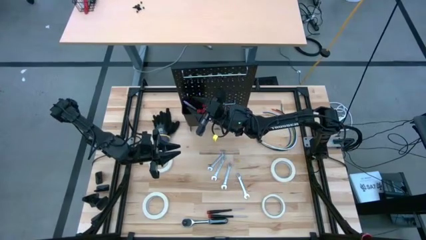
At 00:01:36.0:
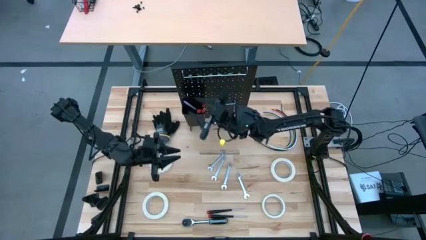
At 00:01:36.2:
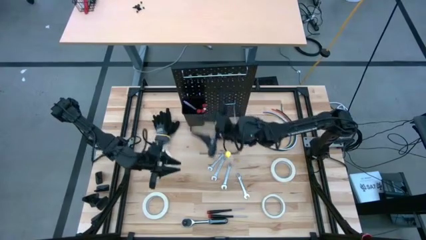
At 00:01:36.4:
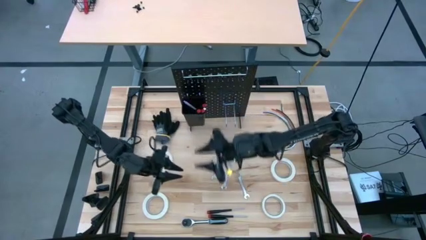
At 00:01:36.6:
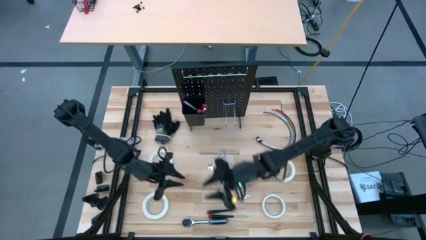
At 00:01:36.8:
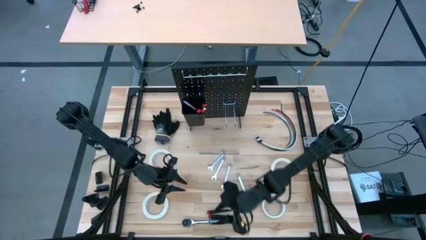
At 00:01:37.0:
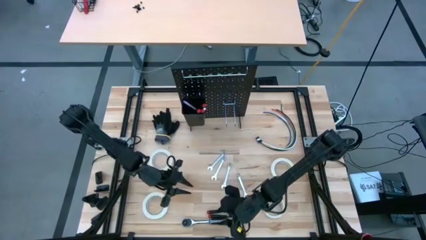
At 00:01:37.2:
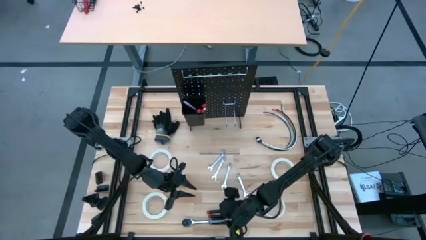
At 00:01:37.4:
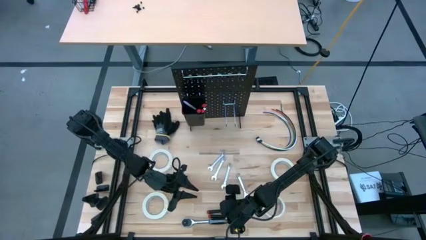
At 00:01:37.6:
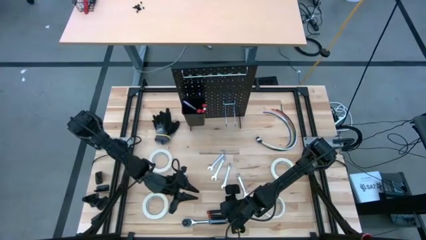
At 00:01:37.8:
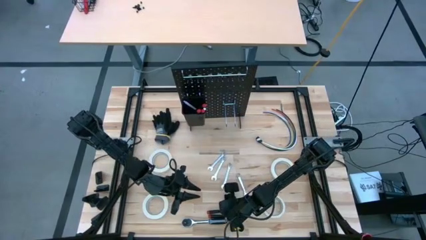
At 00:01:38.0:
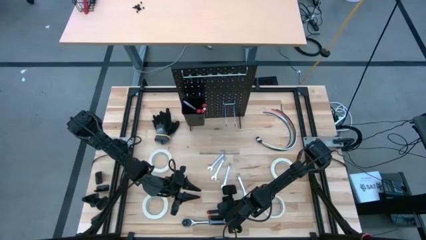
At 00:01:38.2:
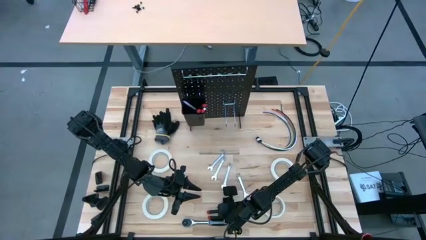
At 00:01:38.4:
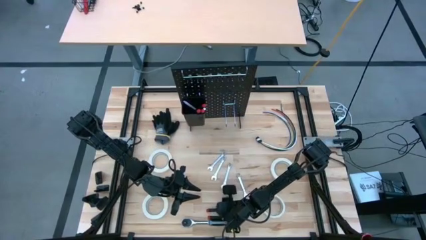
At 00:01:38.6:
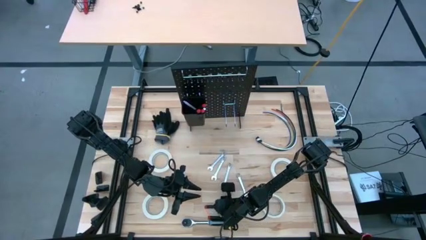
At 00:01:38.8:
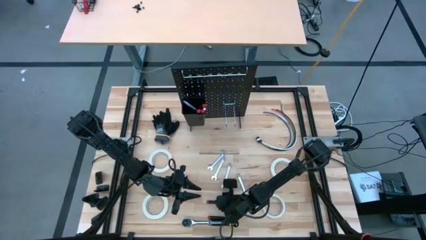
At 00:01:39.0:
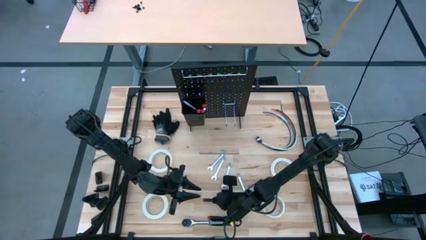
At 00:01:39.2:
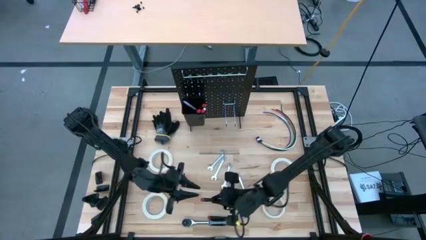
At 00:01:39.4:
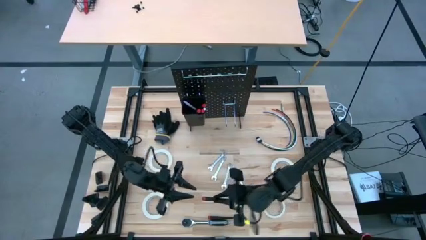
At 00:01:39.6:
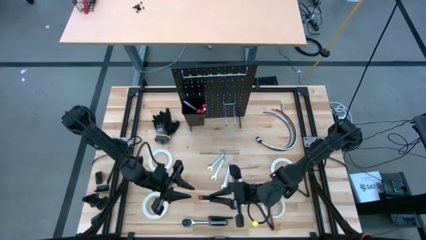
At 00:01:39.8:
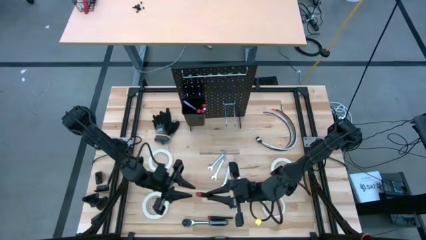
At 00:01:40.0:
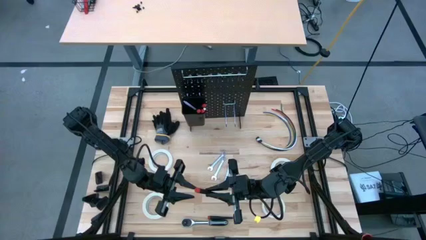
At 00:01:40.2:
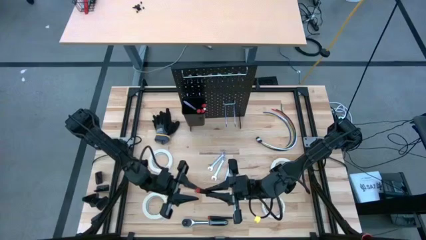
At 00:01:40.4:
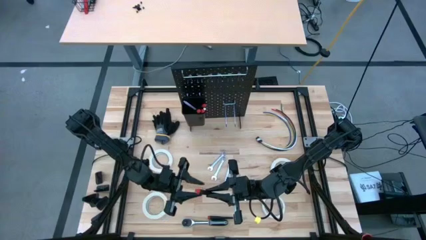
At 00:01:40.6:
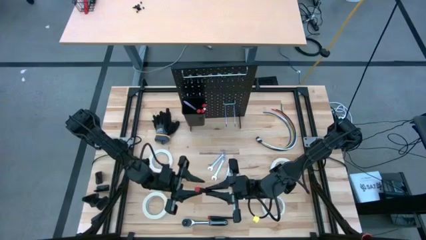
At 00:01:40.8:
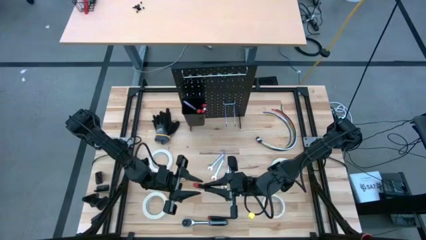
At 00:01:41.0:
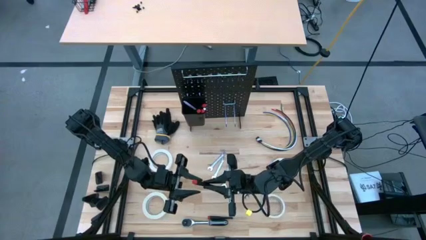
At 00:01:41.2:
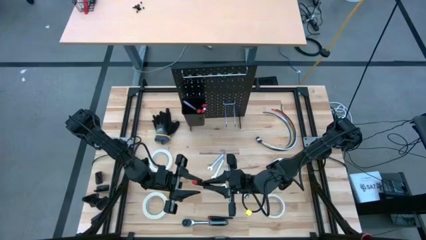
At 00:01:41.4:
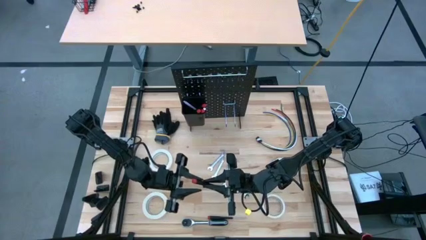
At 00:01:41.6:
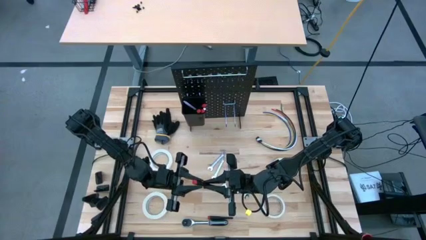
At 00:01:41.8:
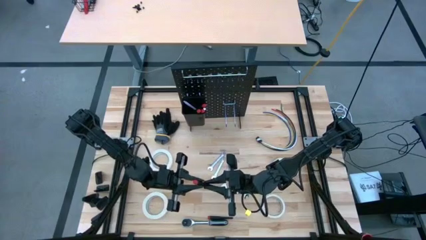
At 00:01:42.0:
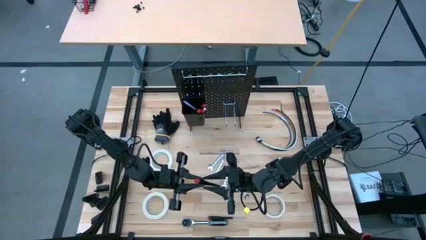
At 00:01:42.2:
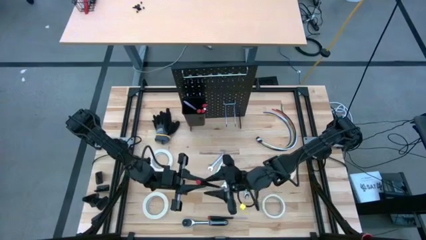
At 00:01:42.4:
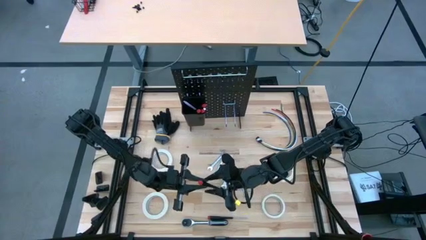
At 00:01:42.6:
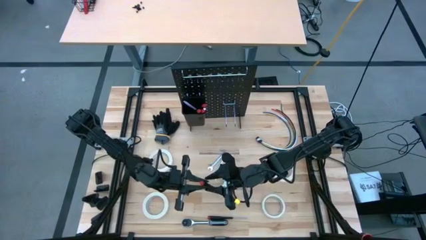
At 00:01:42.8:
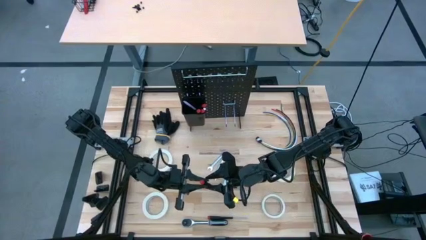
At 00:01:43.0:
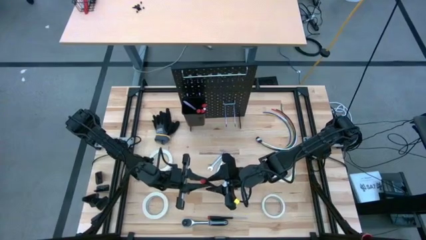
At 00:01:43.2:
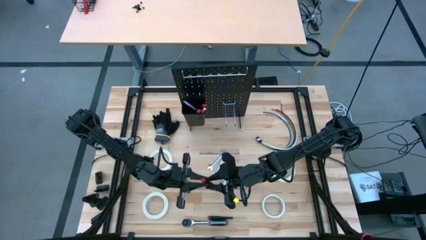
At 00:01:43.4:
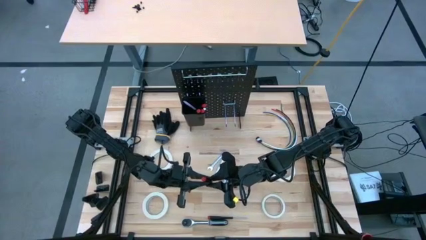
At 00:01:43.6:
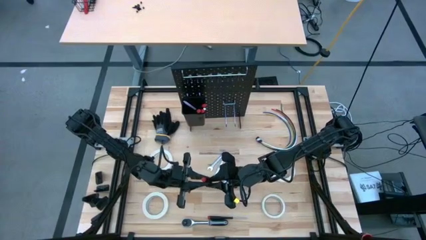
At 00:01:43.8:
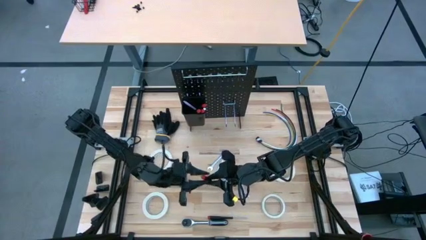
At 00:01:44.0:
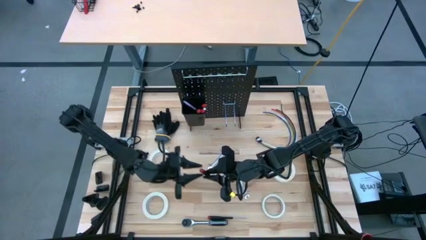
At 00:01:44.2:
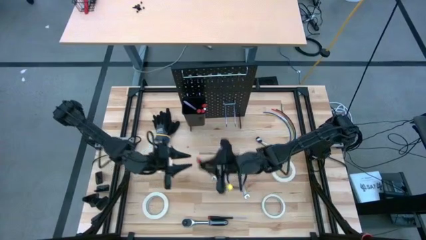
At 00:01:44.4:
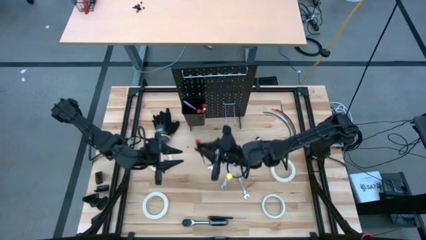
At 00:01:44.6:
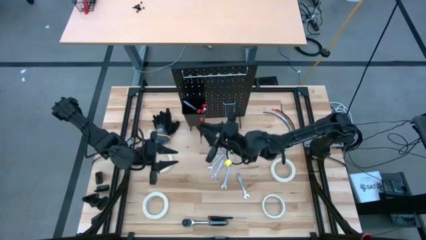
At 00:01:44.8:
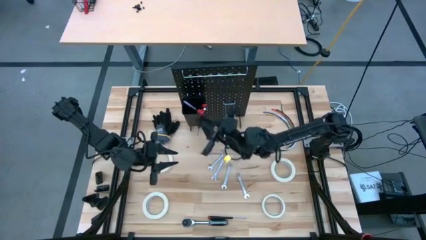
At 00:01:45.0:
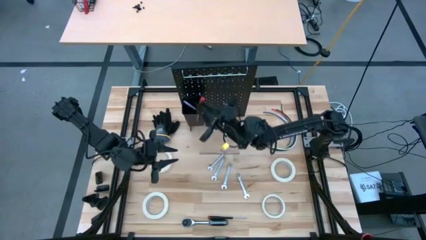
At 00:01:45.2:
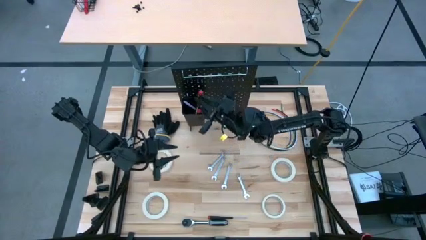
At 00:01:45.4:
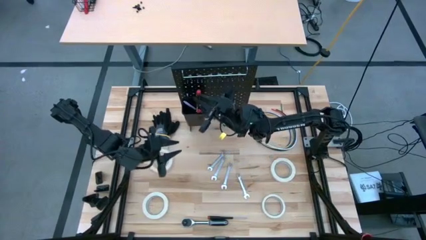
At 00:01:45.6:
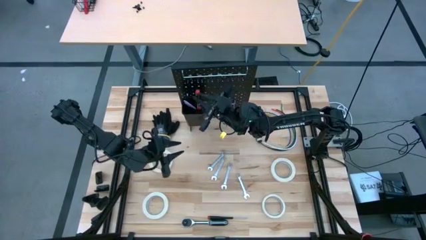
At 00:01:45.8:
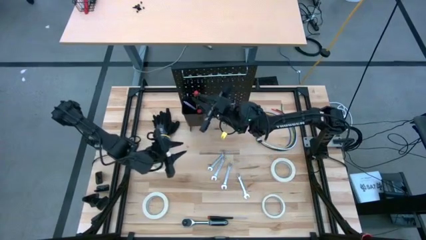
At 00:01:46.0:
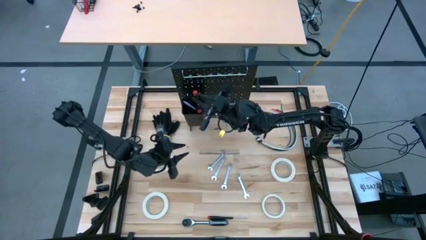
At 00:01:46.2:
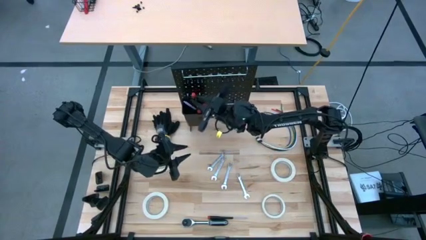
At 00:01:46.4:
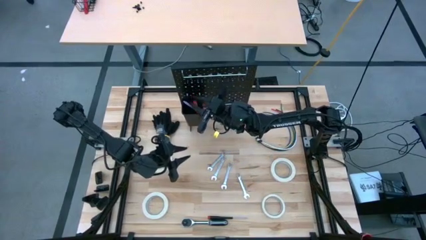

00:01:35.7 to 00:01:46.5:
Task: Hang tools onto peg board
Put the nut driver into the black bin on the peg board
